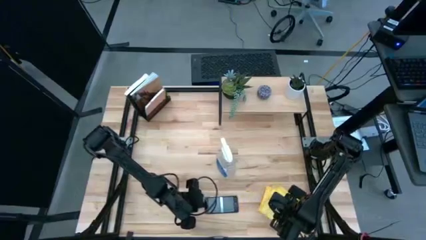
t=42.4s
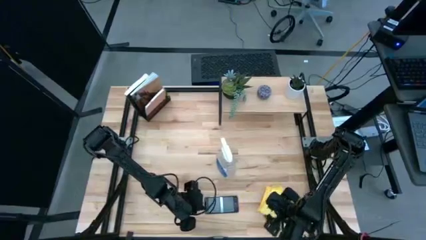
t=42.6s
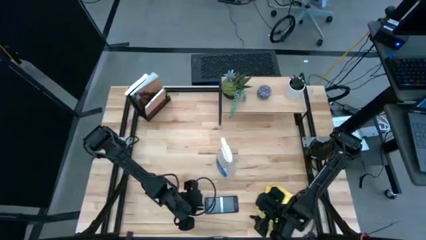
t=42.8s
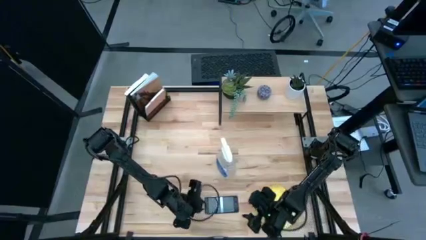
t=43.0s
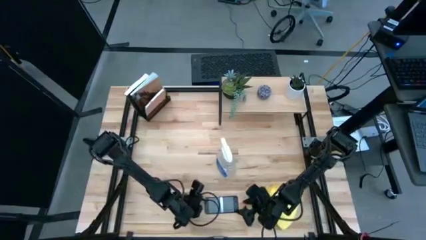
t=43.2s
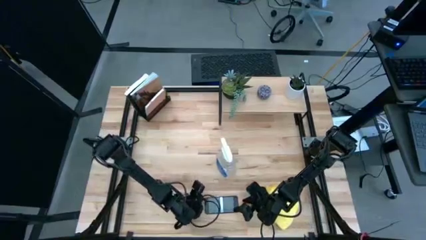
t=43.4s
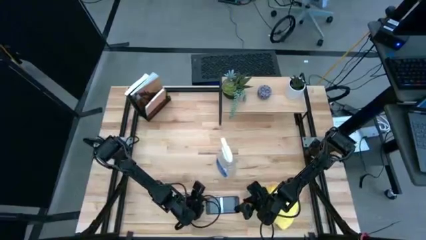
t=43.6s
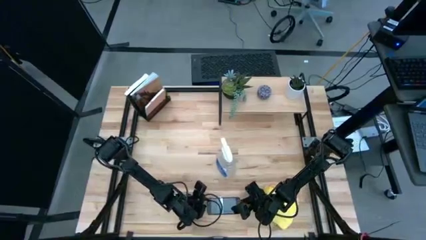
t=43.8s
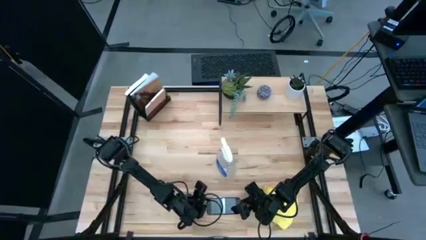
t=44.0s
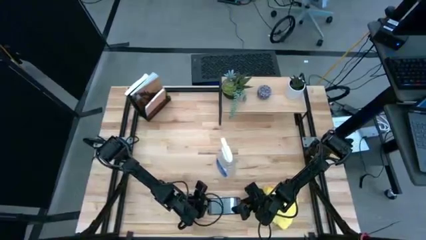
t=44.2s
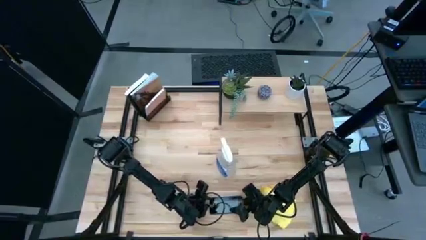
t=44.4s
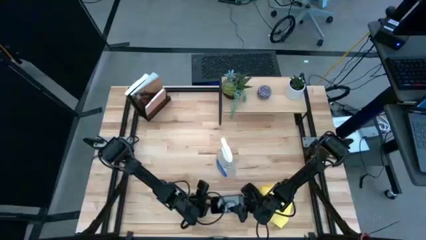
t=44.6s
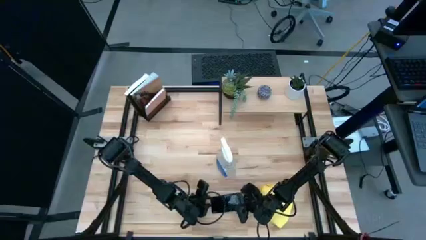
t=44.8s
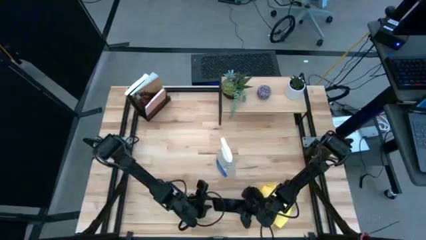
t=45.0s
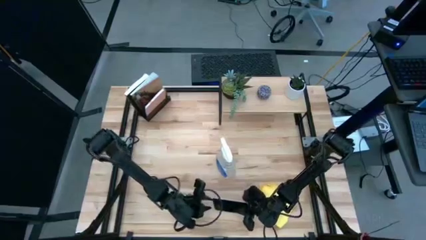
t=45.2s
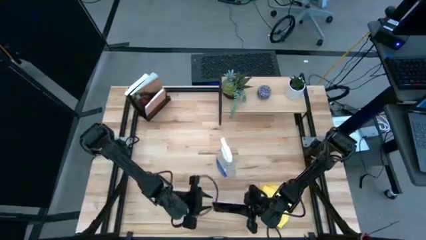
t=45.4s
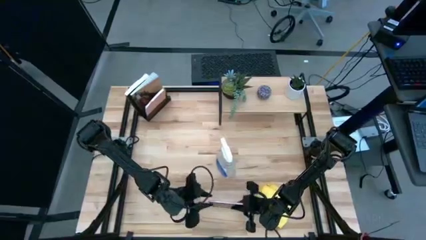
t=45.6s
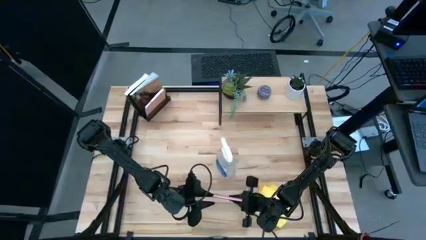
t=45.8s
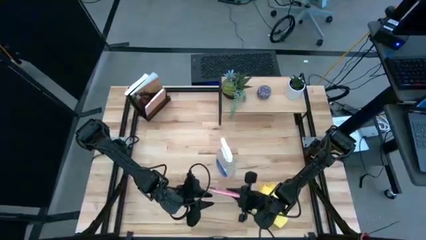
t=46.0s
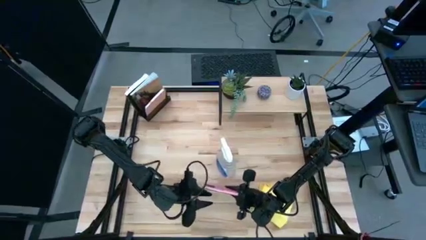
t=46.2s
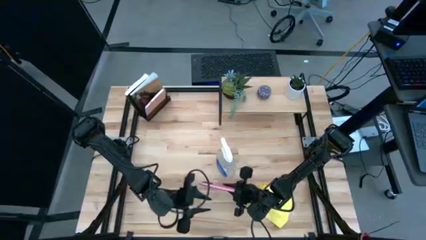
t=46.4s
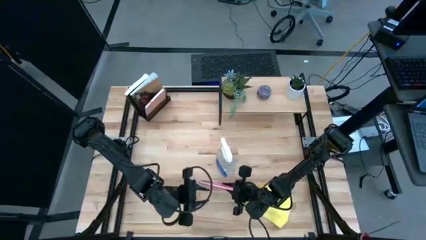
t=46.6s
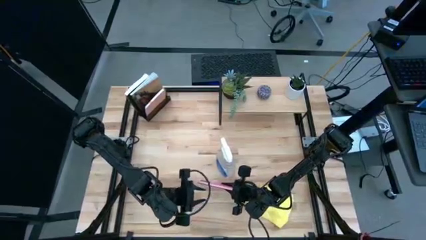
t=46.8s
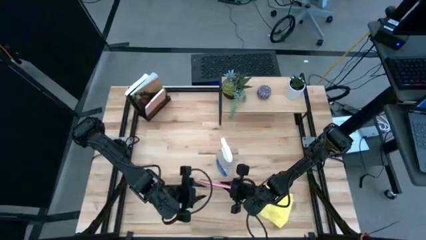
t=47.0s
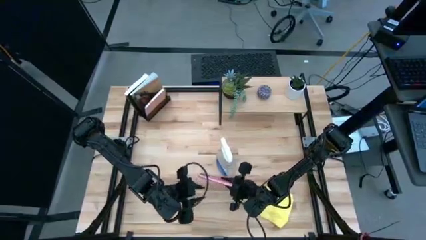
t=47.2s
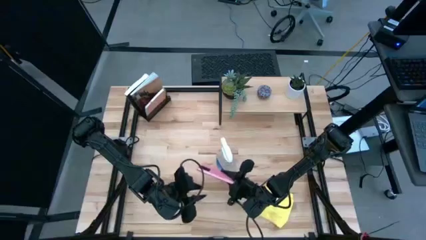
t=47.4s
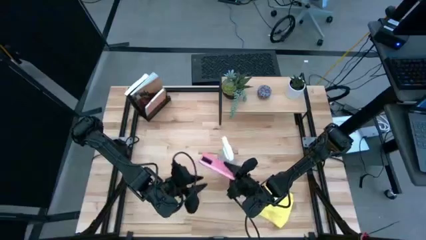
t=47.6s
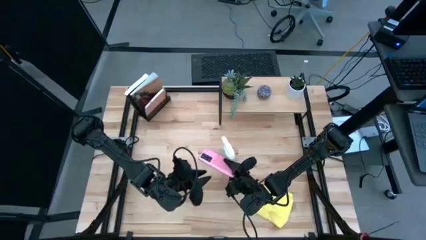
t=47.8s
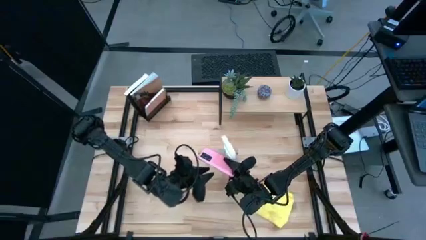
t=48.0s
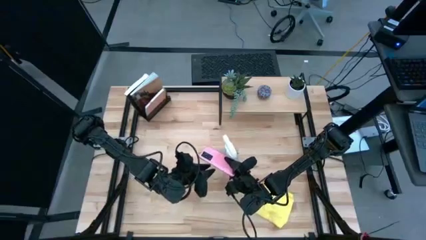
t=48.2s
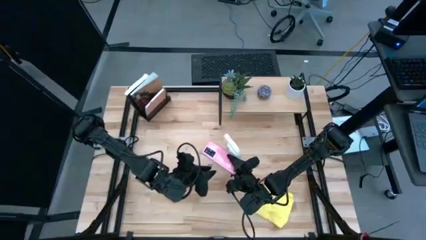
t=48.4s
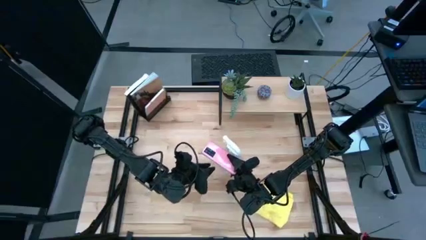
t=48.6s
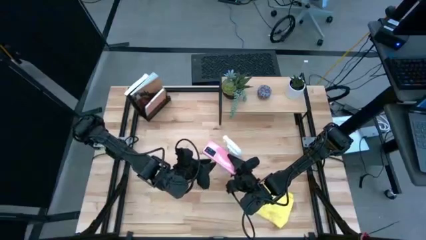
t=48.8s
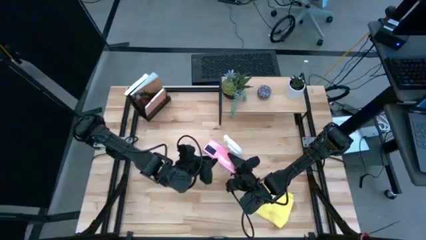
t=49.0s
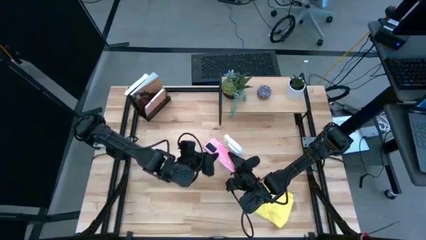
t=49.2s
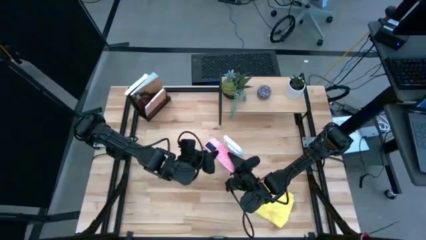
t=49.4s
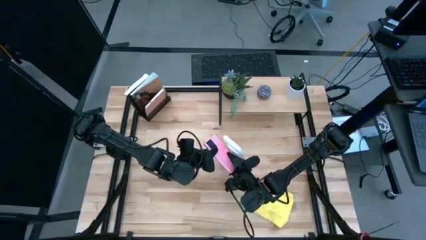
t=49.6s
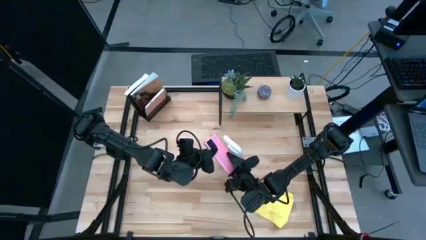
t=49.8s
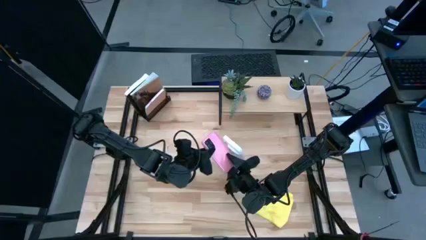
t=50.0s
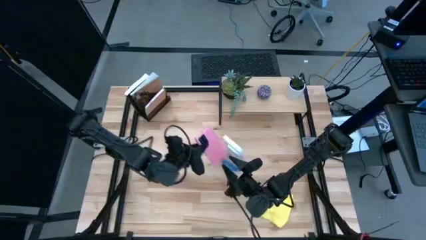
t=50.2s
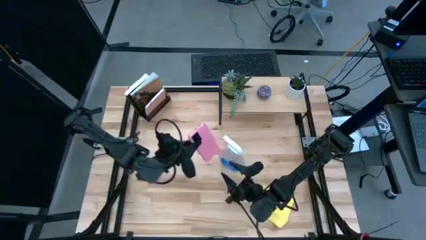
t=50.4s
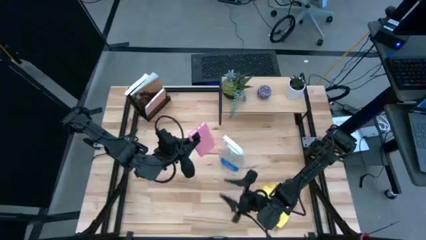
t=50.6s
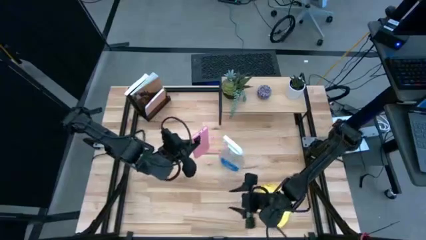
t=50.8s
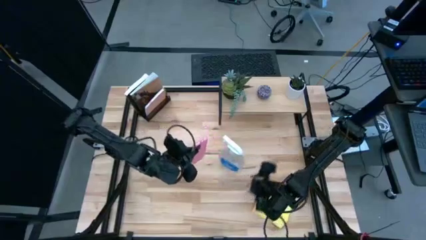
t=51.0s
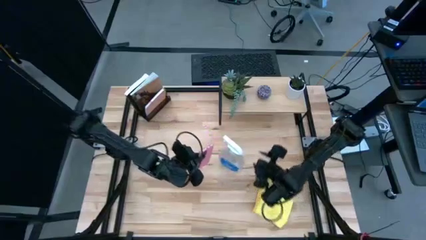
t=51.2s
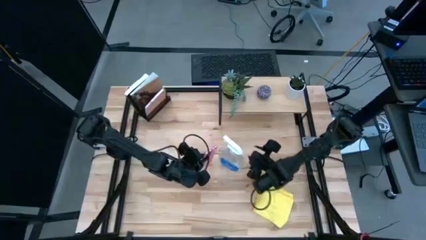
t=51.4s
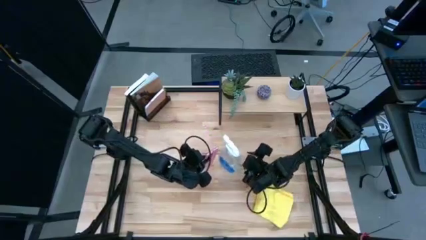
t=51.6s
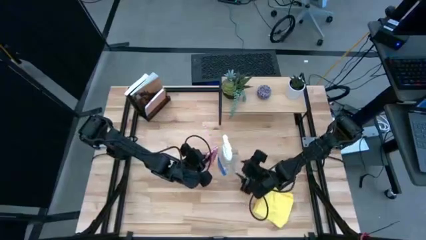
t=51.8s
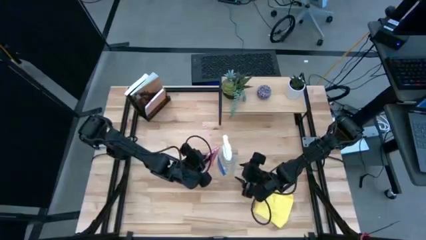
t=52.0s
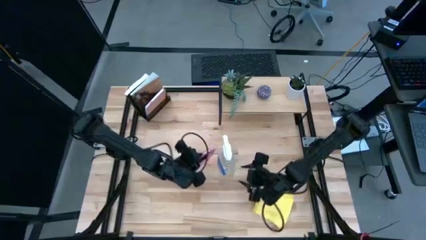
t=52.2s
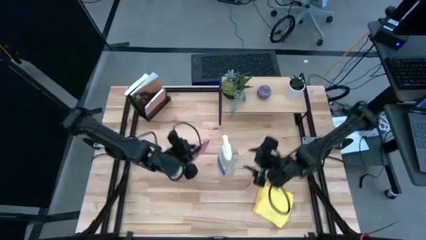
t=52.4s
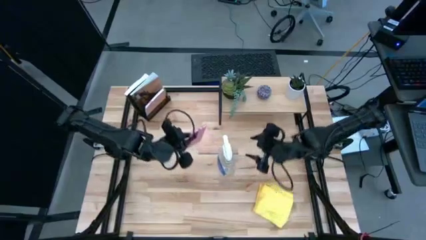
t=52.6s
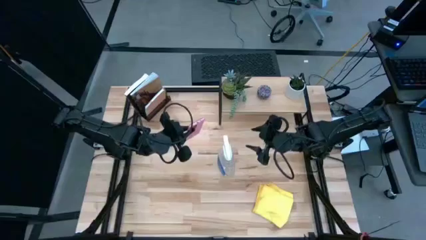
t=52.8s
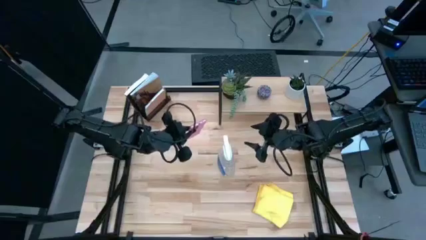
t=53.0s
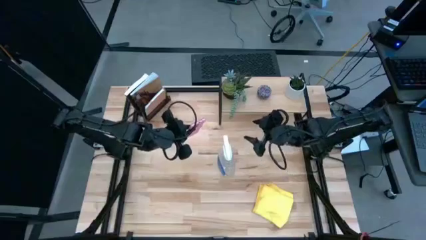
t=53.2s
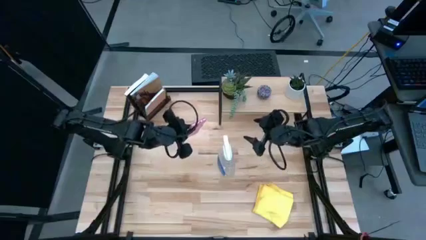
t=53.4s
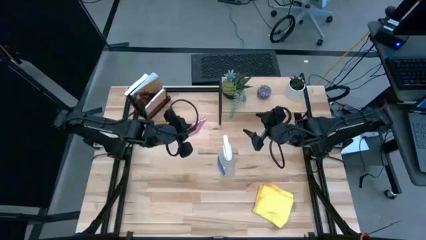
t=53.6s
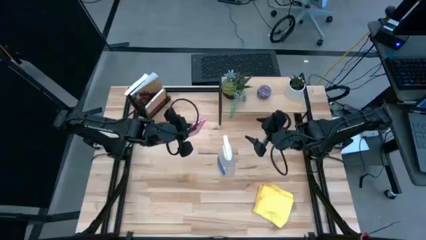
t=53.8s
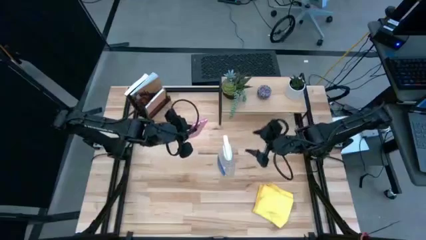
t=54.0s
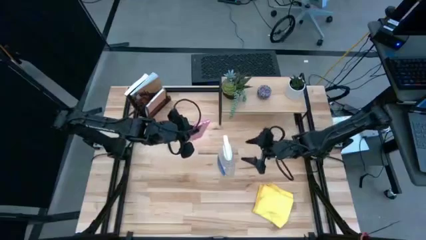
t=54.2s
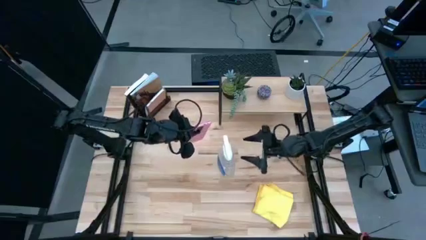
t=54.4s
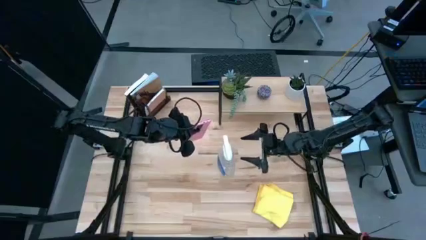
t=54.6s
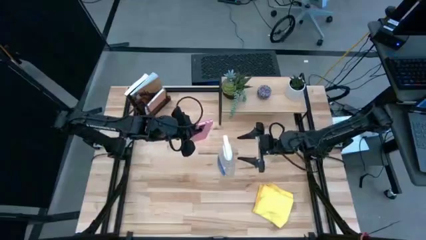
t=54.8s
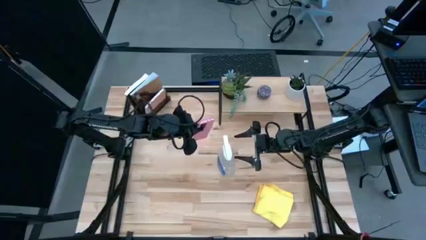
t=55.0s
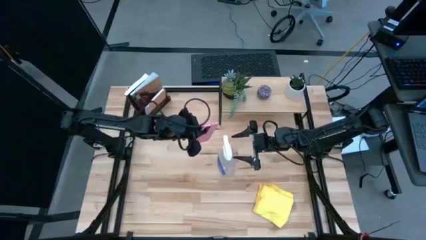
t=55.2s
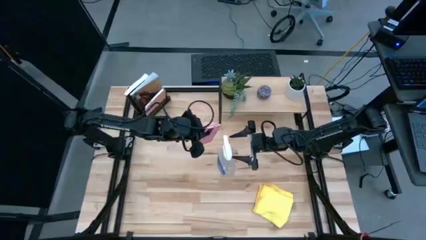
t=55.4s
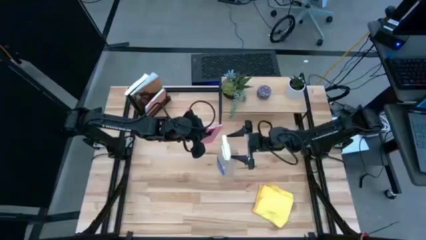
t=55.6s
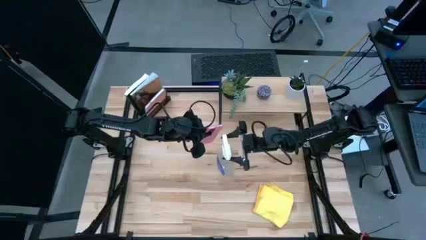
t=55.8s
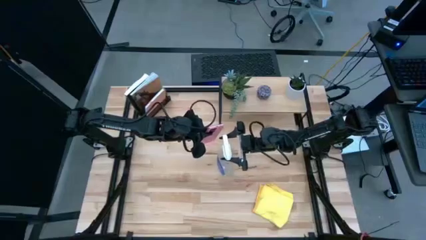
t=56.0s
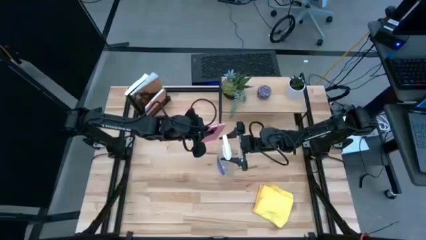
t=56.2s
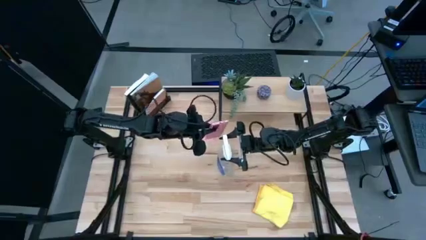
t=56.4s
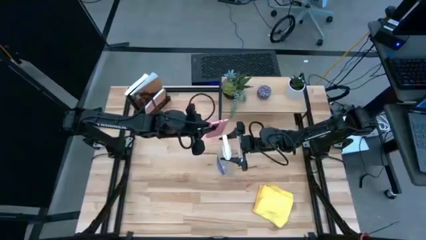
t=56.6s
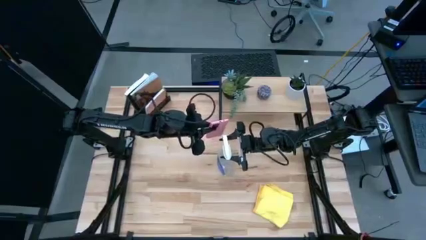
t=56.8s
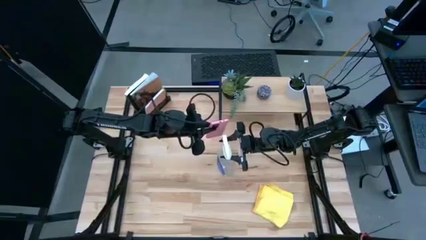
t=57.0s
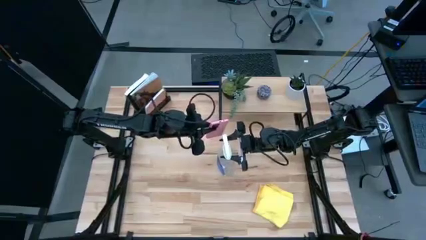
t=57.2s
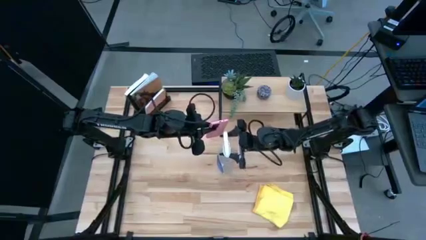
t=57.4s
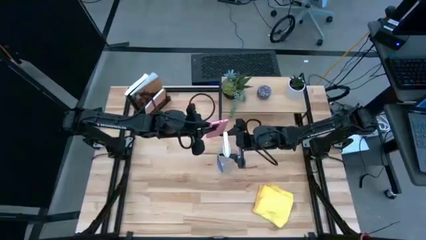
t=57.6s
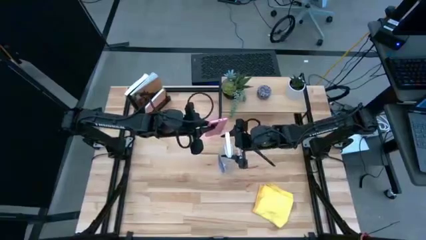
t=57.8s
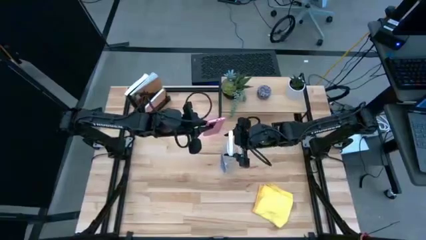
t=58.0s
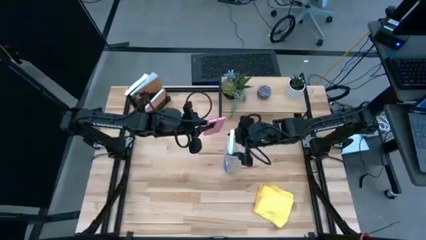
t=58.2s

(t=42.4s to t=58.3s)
Task: Apply microfiber cloth
Spray the back of the cellphone using the glass cleaner spray
